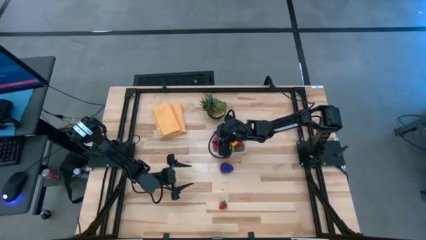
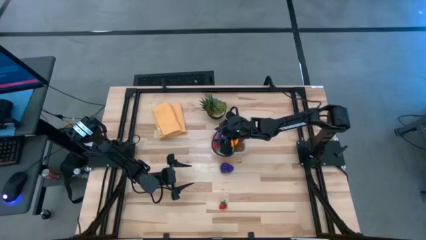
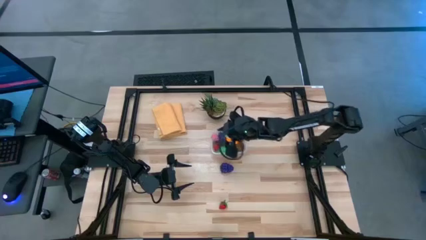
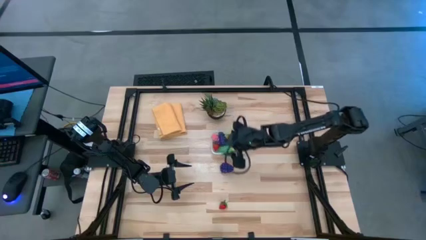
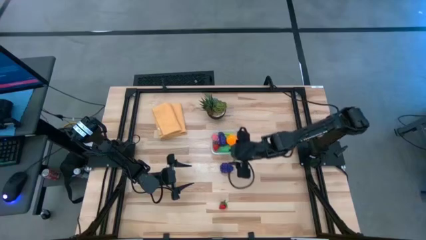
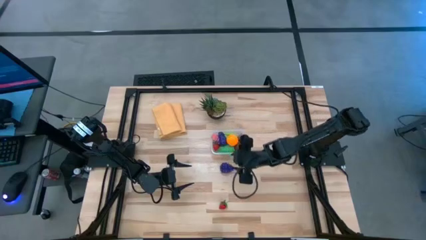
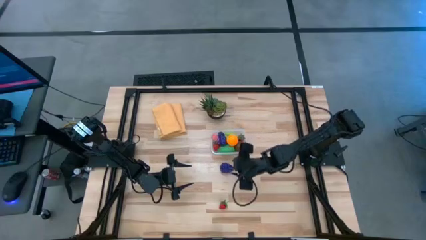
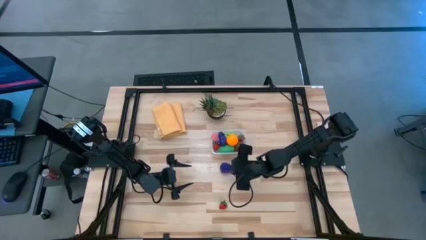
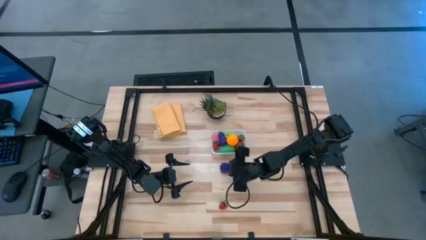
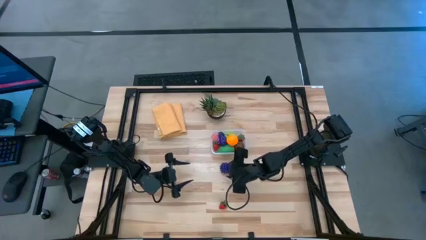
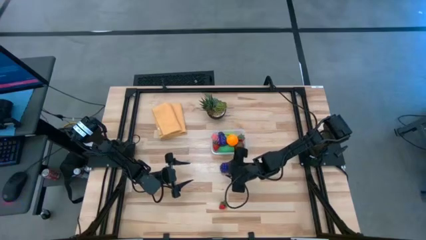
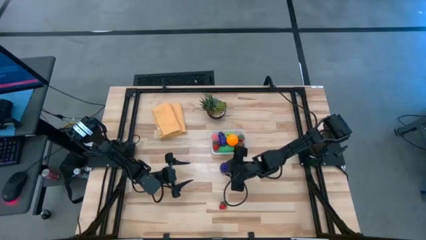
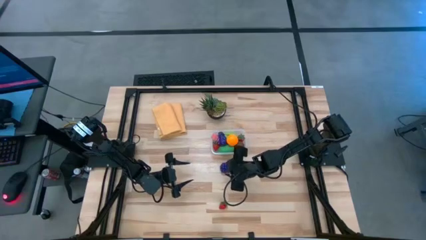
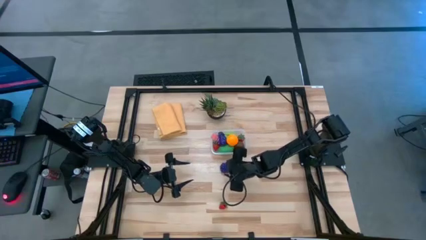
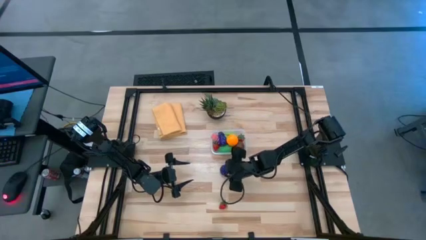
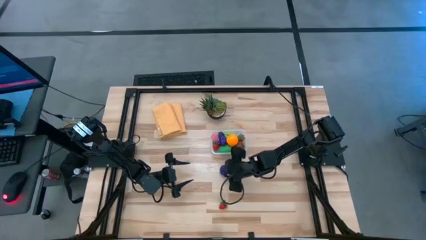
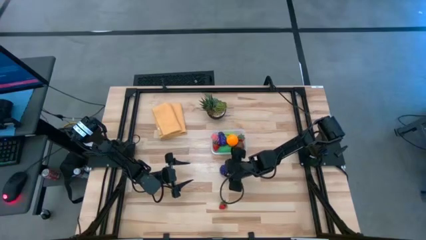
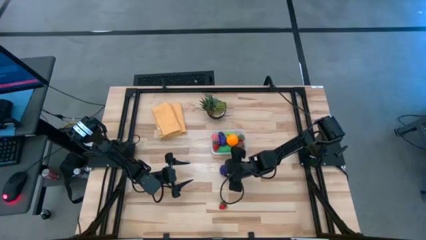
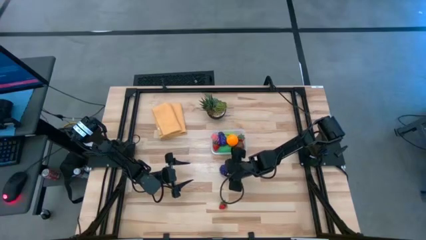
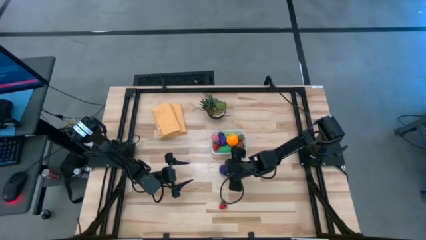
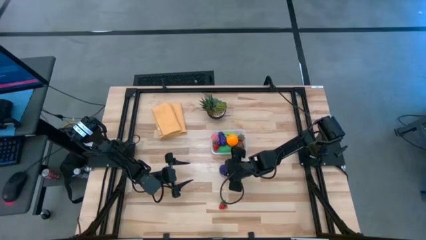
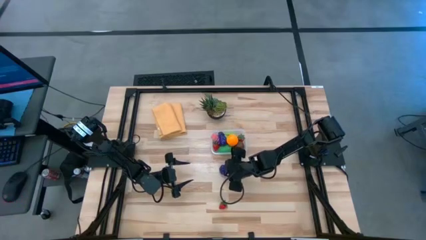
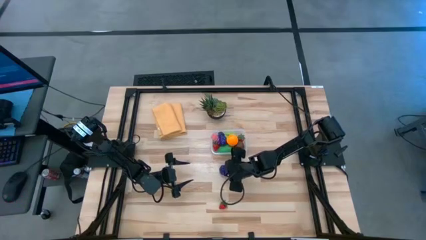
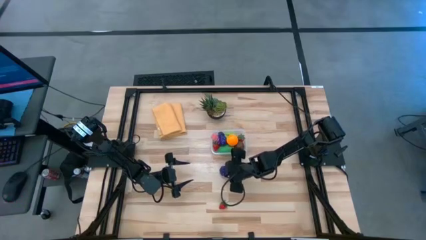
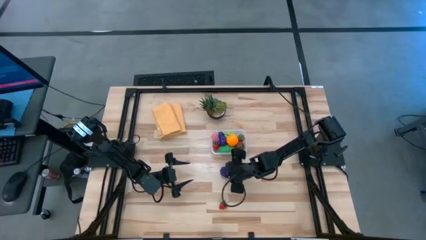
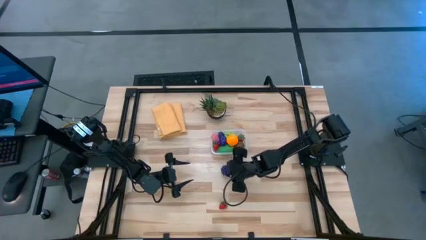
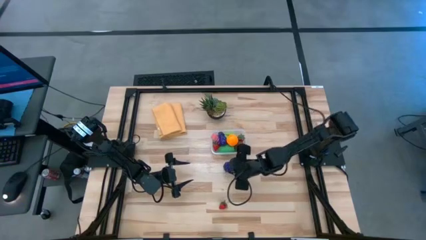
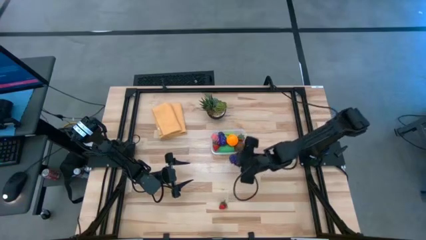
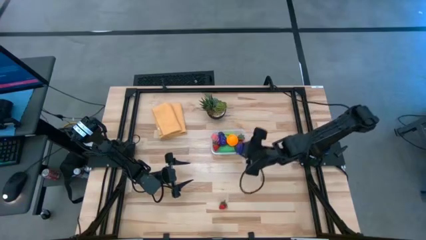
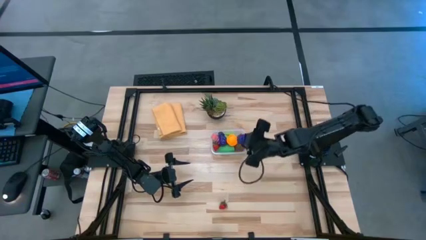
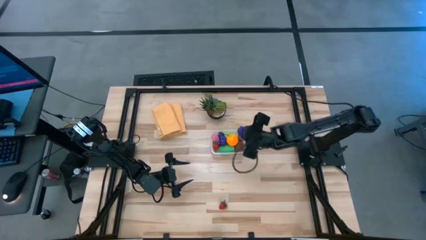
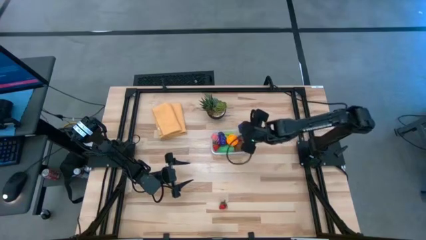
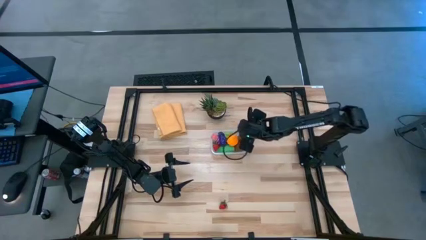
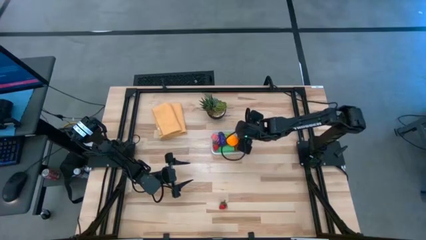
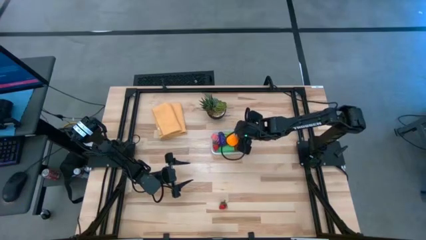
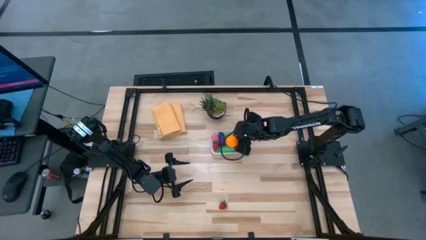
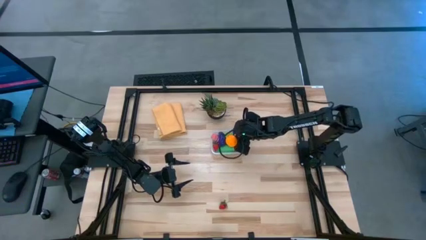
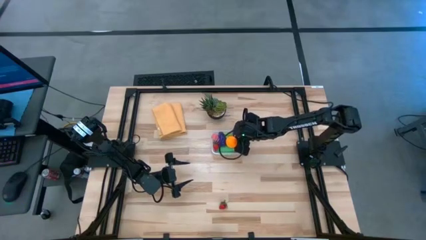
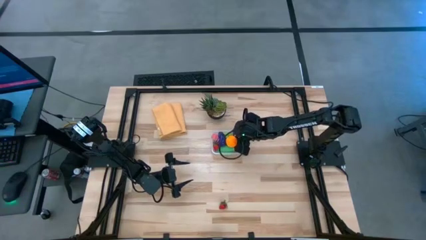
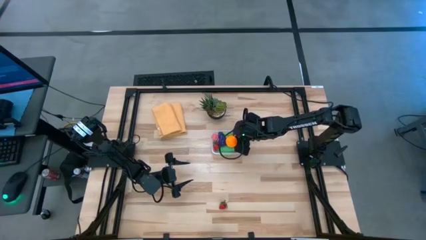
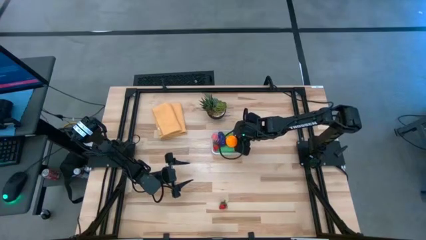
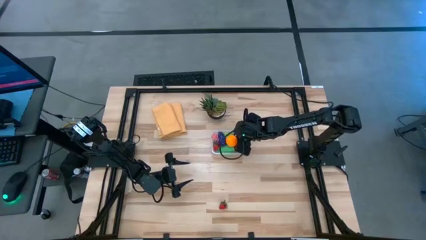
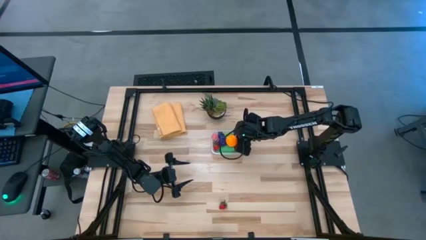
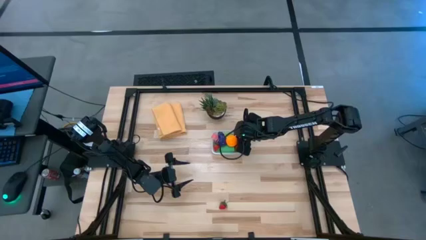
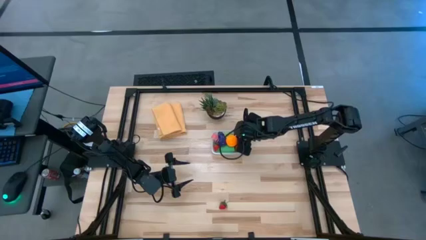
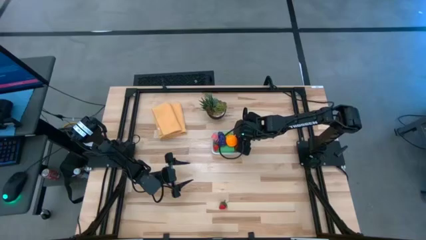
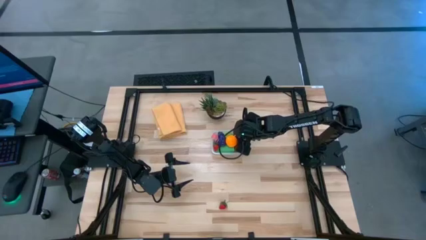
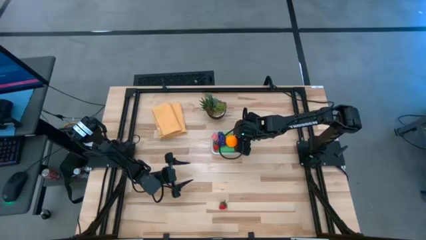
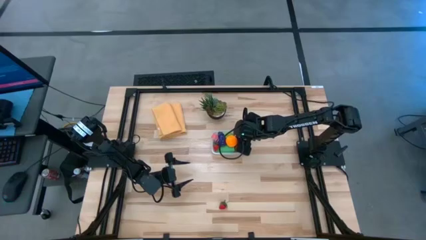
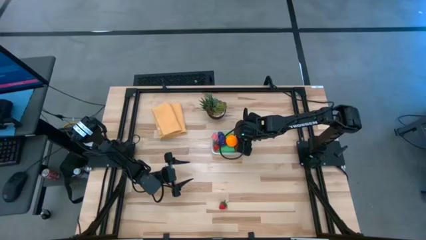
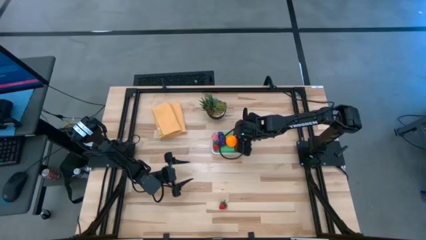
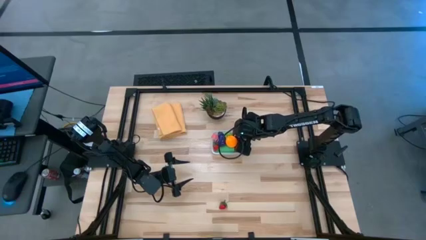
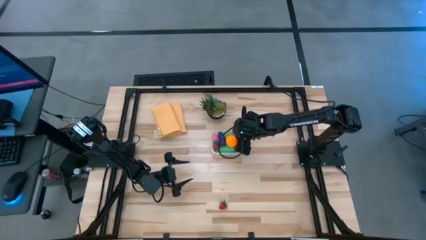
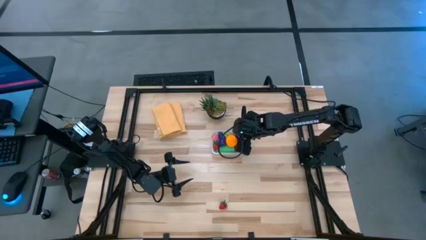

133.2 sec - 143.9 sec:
Task: Pick and placing Produce into tupperware
Put the purple grapes into the transparent container

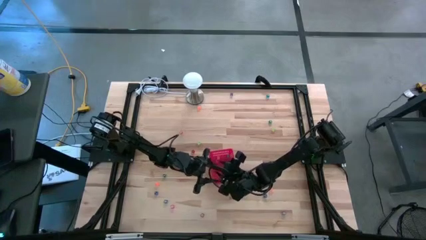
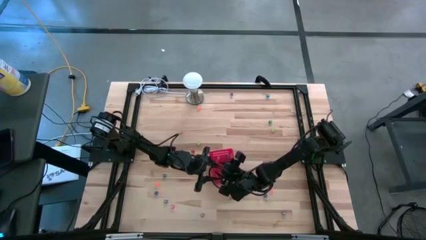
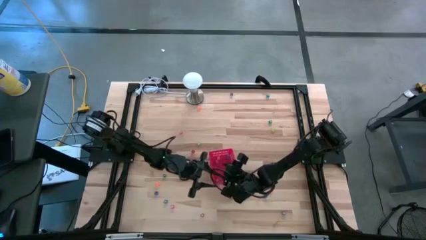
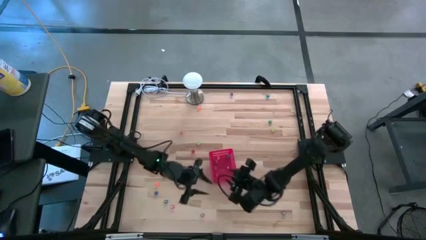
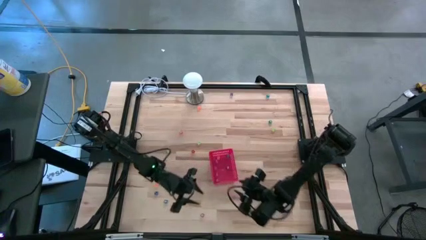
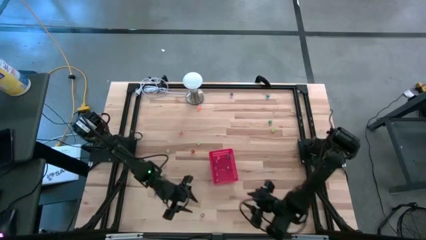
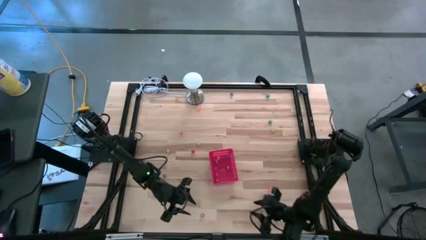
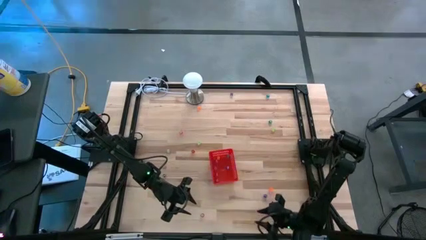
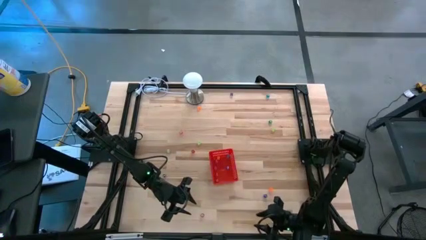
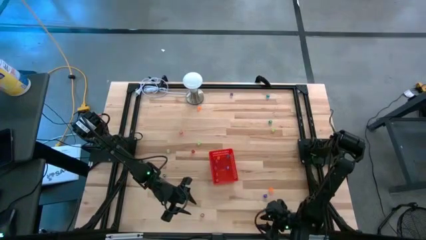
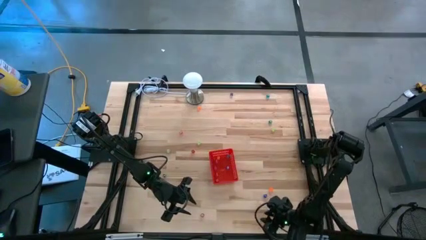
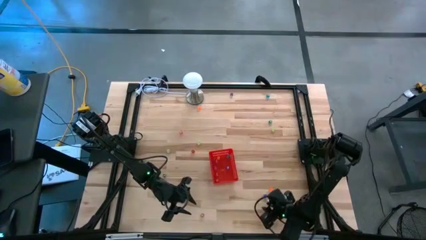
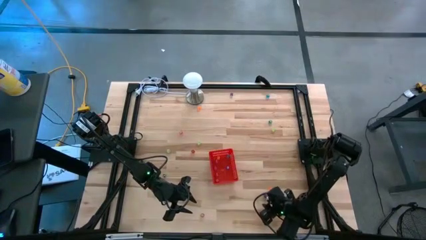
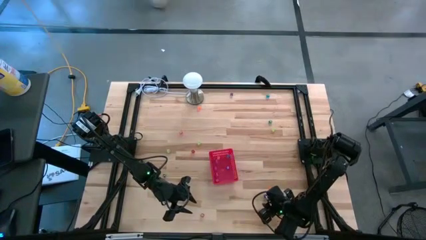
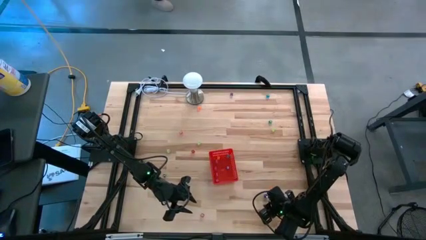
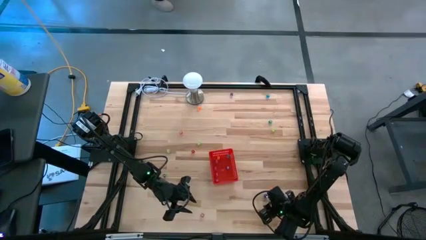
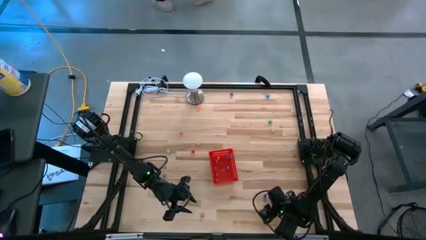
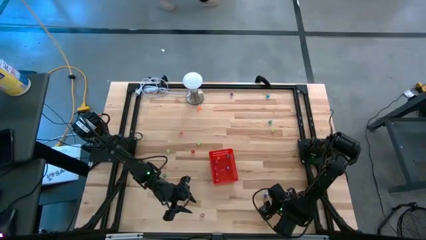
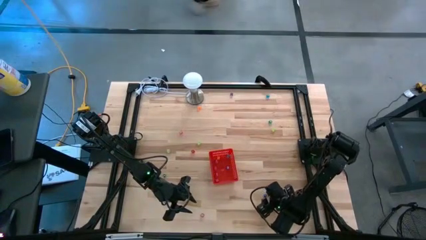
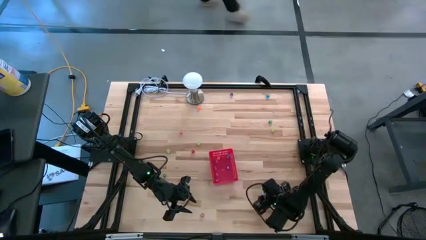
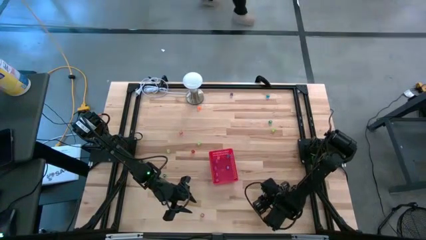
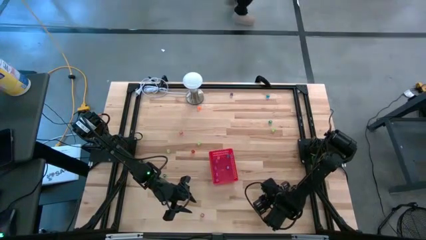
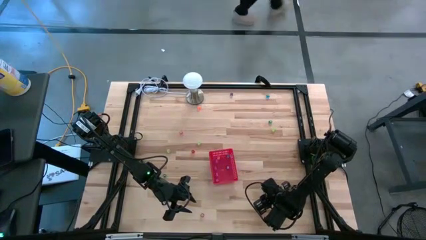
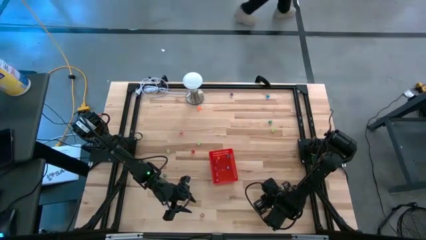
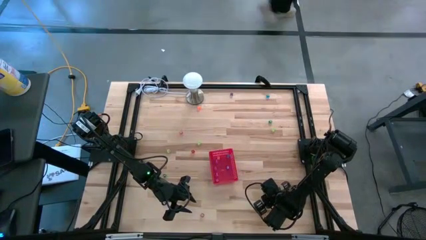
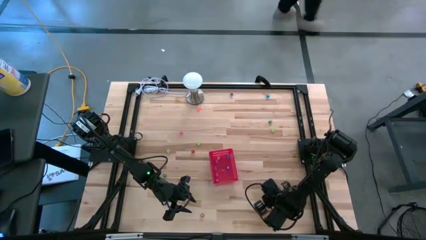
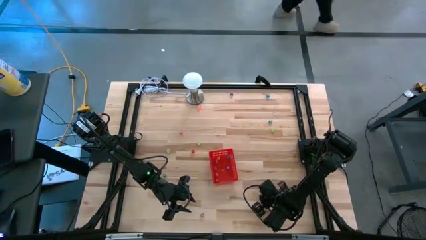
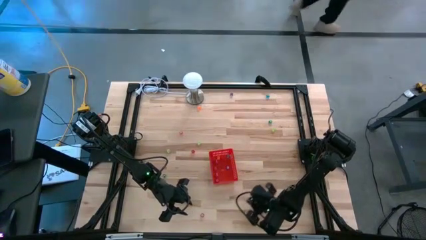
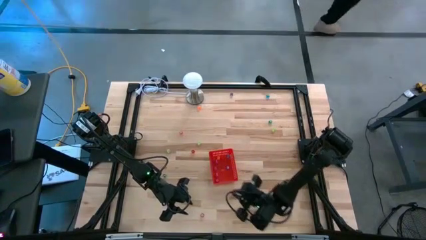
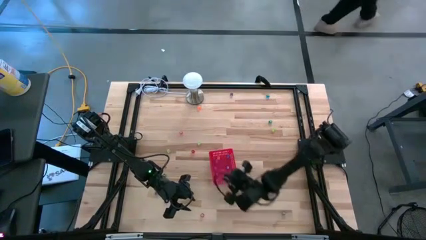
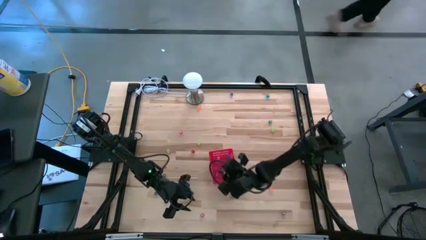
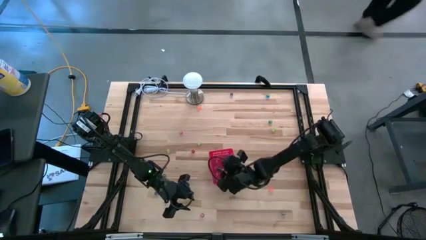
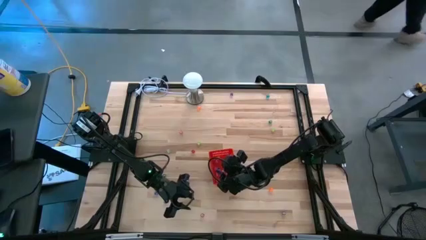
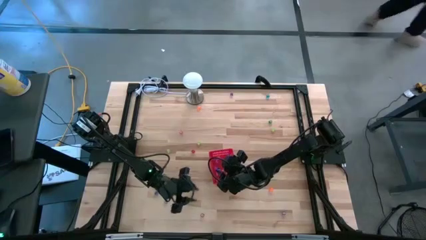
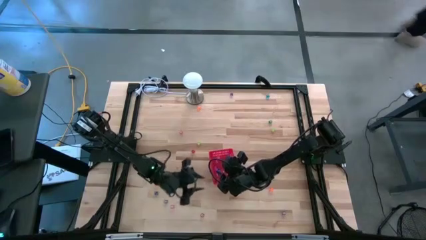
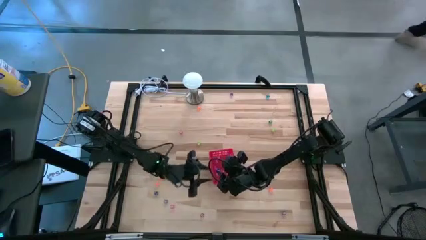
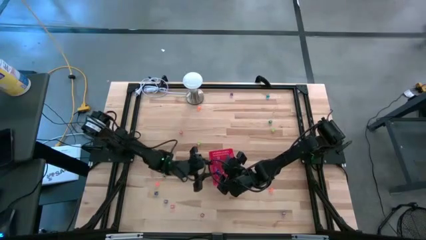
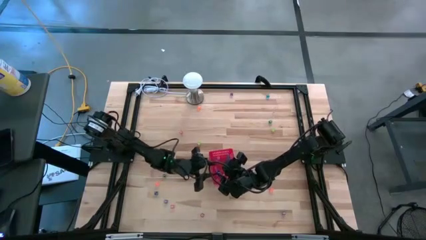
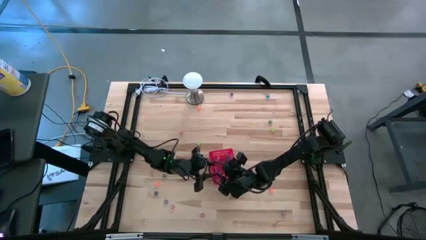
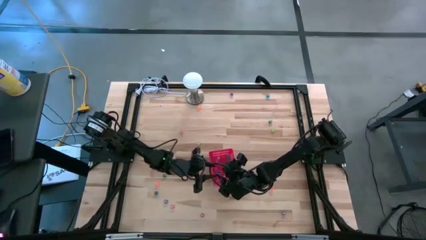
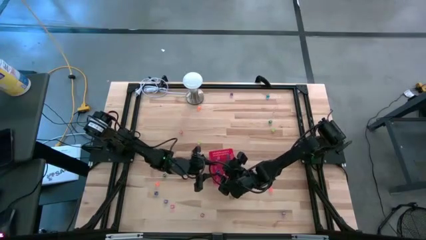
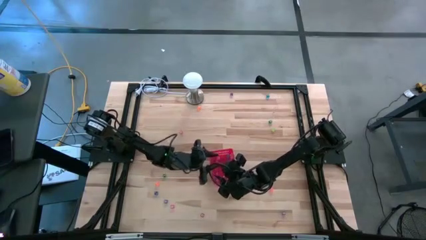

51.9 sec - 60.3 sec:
Task: Pick & Place Dice
Put the dark blue die into the red basket
